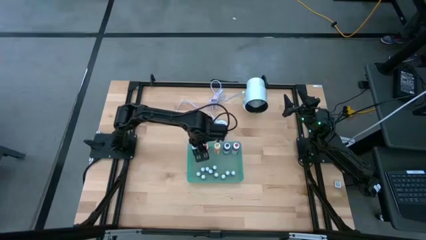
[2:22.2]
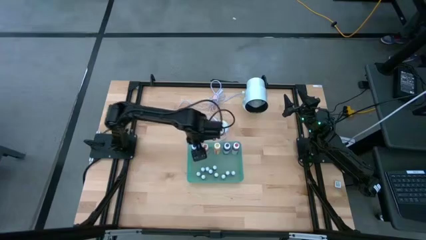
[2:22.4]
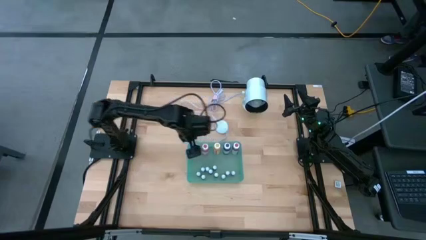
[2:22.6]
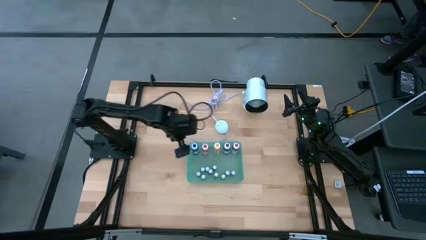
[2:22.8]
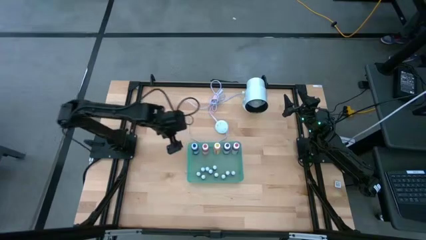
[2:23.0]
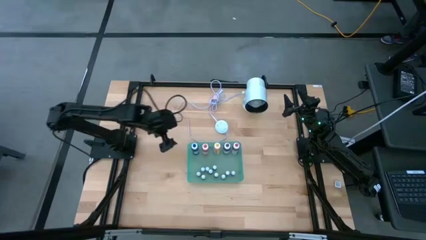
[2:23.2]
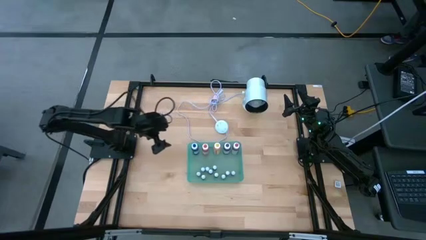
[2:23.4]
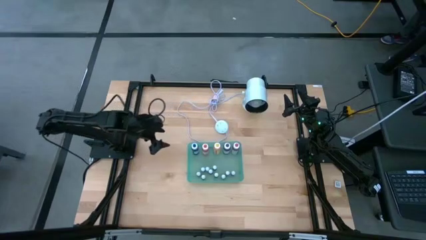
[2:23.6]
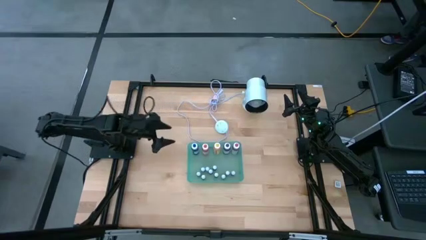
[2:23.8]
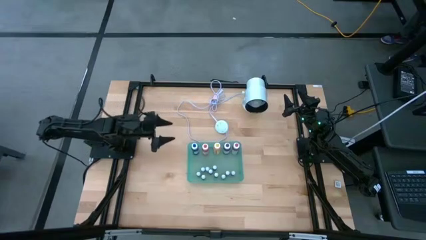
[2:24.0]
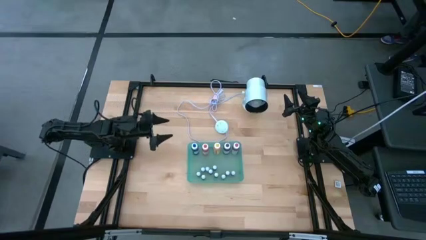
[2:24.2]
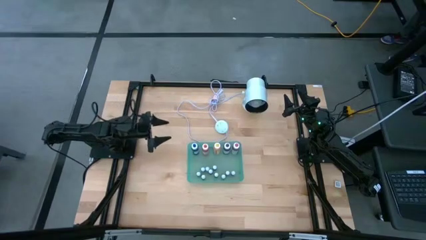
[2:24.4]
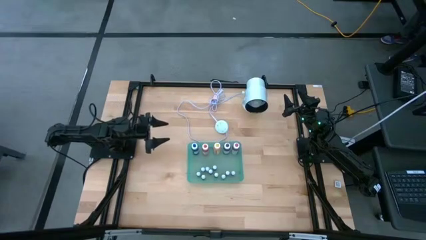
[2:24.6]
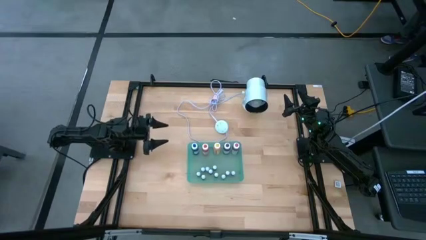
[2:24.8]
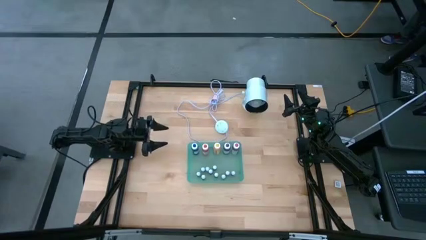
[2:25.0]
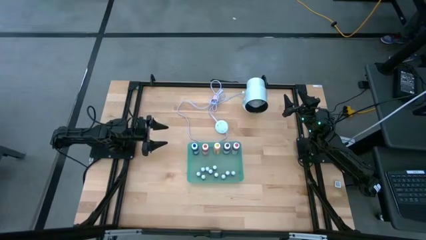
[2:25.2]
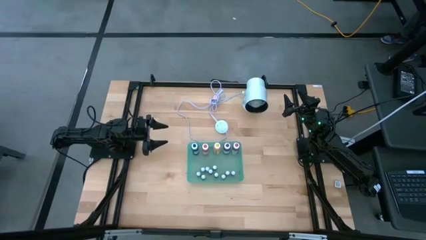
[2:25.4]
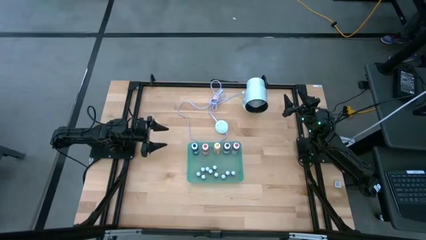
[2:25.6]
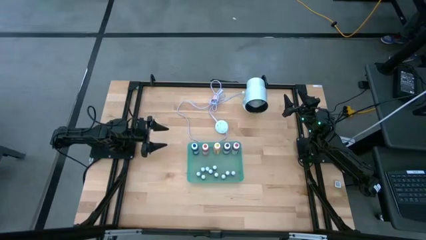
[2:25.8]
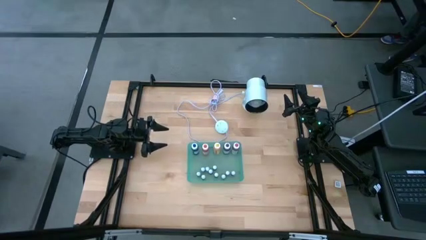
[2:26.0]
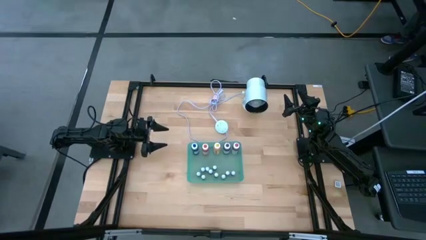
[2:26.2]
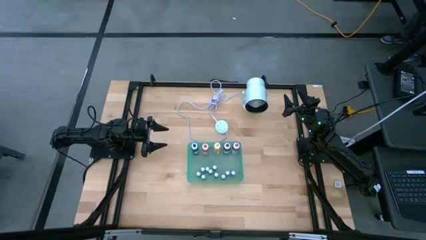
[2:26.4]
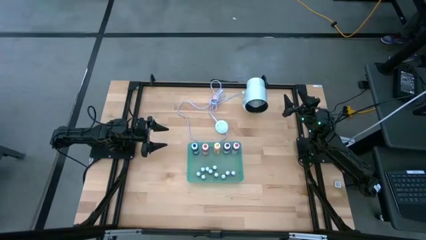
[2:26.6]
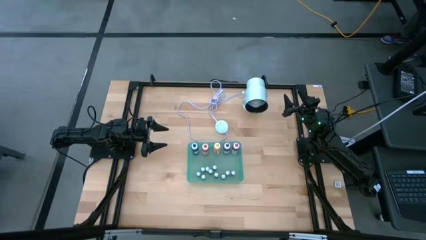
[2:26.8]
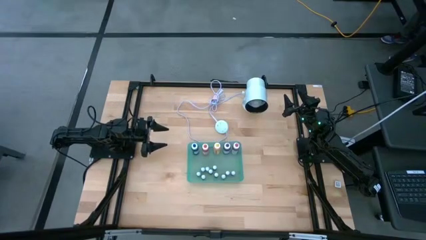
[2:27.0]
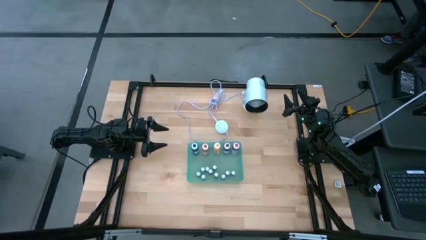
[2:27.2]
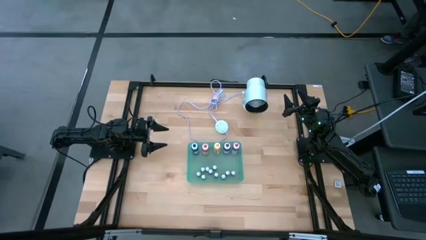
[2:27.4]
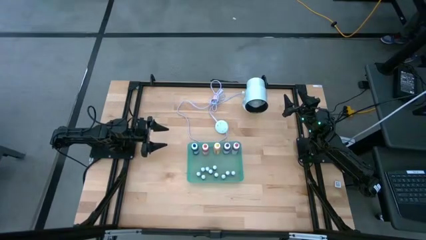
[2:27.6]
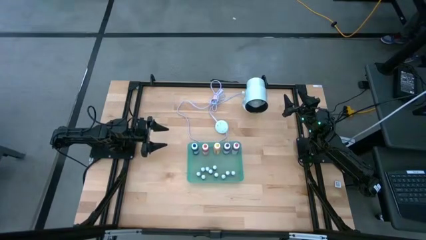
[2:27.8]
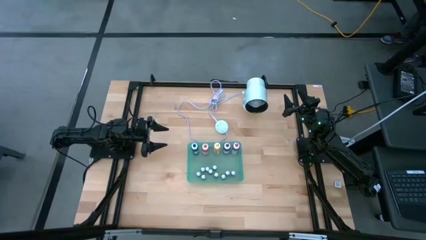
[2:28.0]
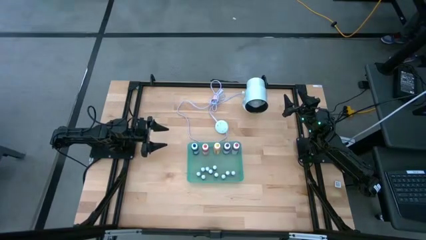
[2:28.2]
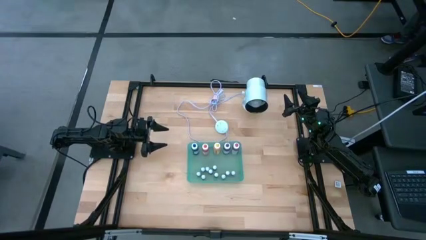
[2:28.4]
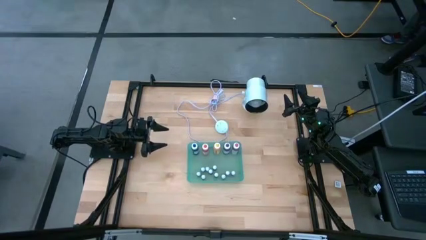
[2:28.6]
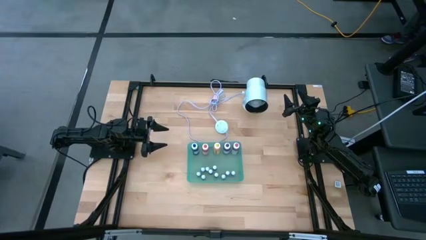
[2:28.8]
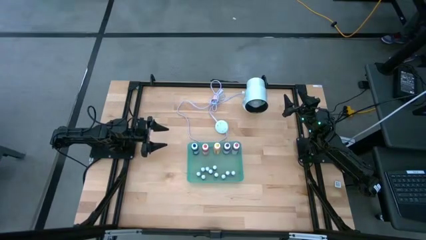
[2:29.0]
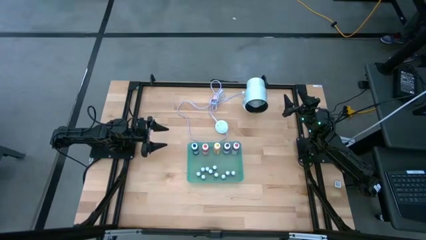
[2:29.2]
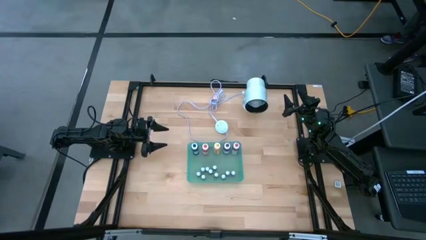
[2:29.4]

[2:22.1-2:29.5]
Task: Pick & Place food coloring
Return to Home Position

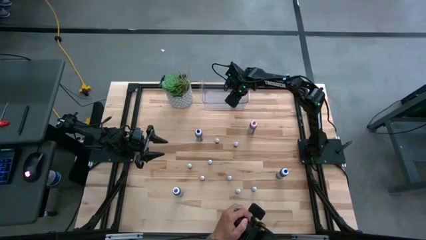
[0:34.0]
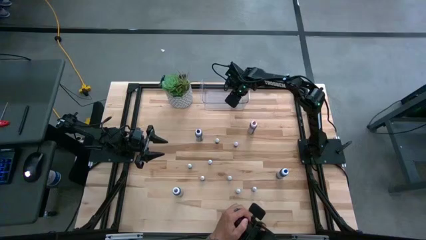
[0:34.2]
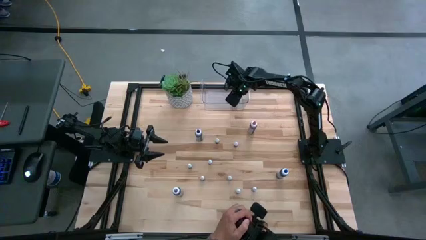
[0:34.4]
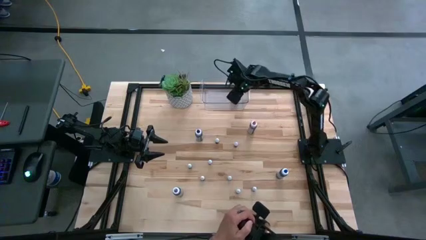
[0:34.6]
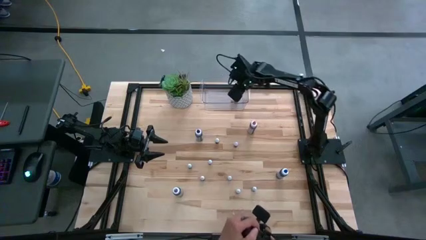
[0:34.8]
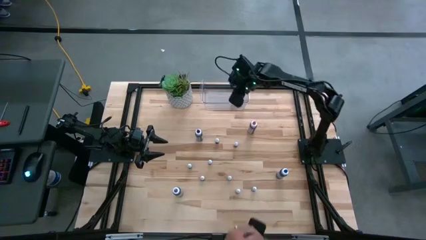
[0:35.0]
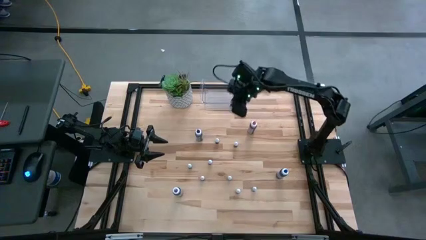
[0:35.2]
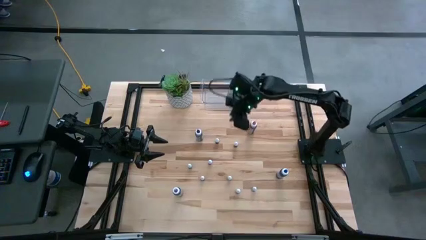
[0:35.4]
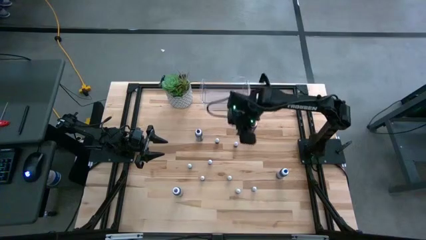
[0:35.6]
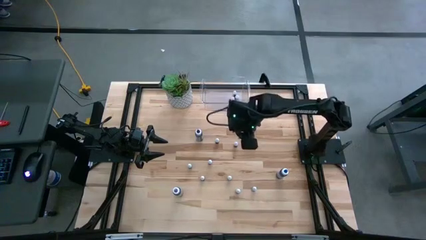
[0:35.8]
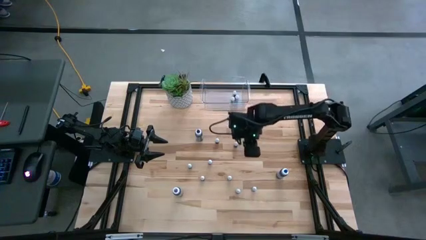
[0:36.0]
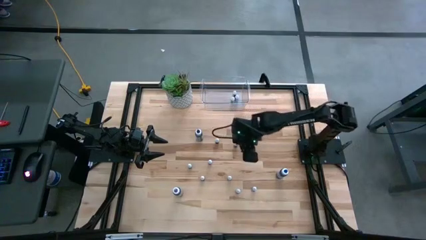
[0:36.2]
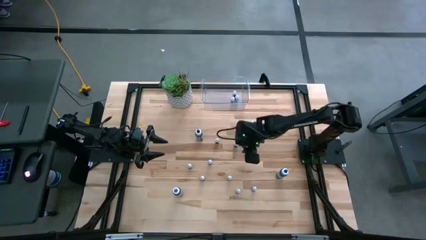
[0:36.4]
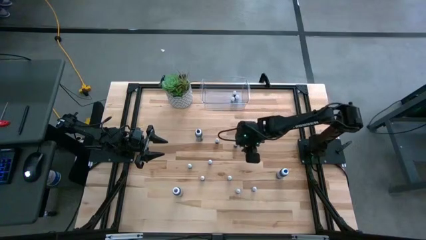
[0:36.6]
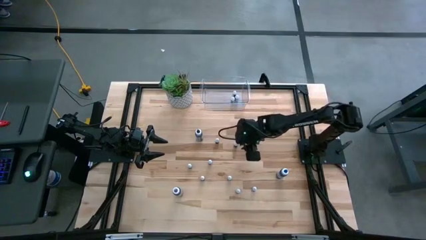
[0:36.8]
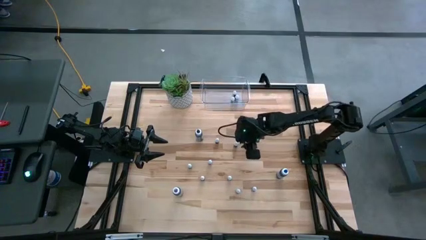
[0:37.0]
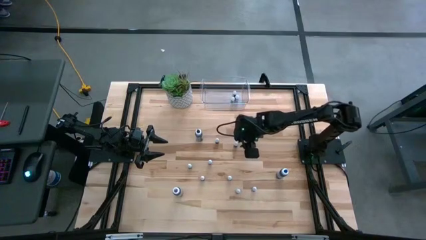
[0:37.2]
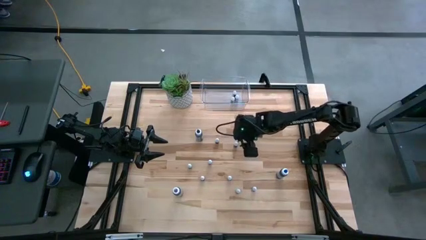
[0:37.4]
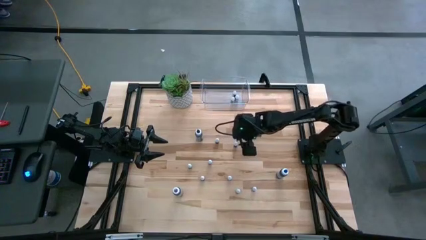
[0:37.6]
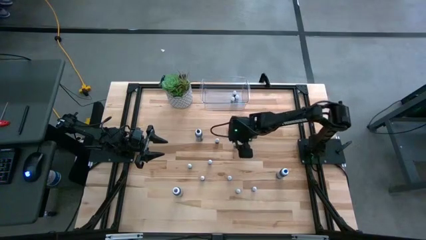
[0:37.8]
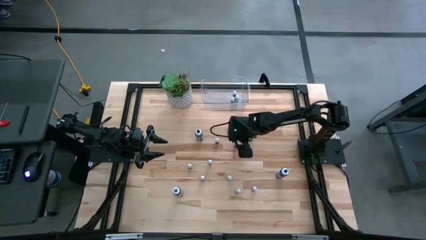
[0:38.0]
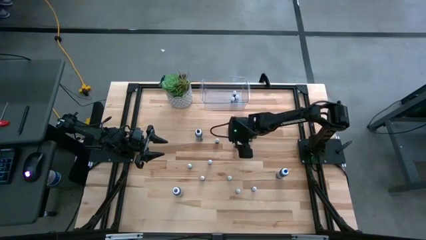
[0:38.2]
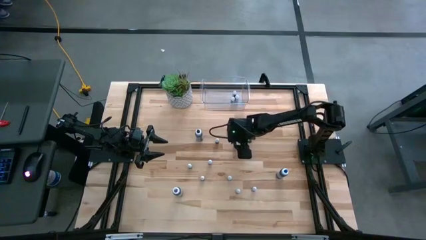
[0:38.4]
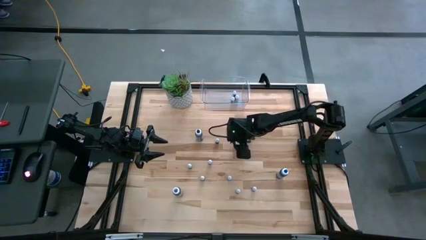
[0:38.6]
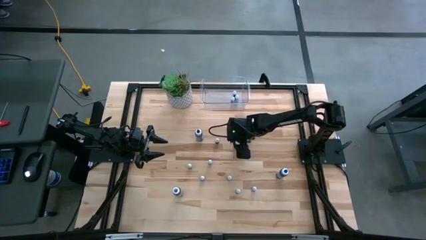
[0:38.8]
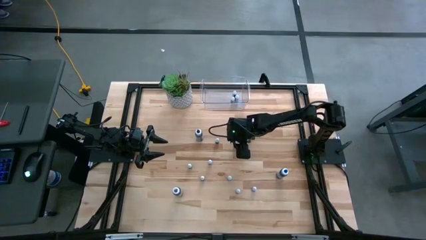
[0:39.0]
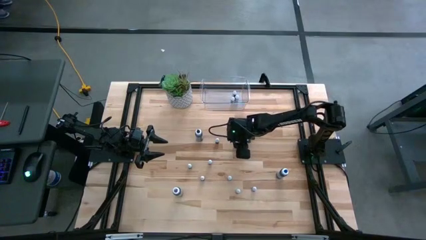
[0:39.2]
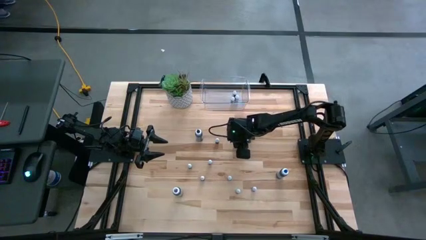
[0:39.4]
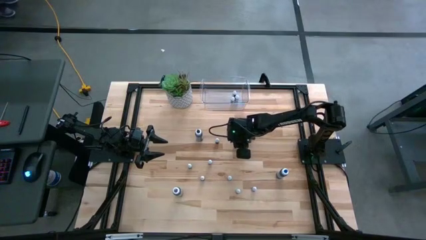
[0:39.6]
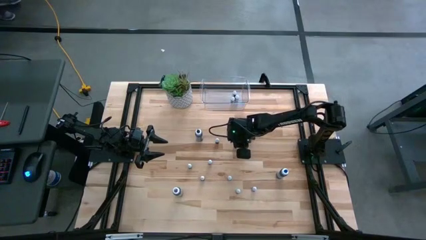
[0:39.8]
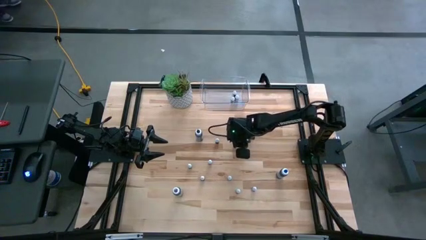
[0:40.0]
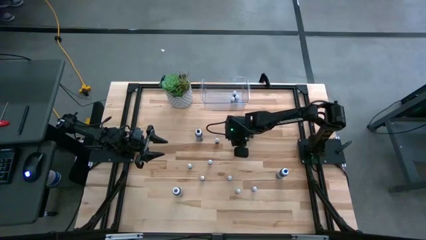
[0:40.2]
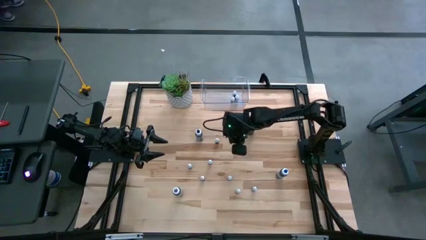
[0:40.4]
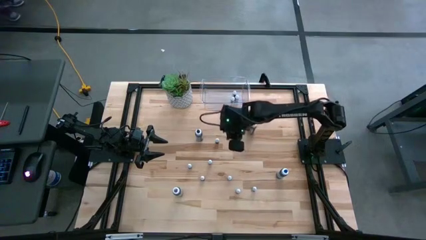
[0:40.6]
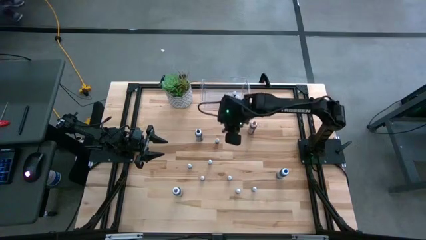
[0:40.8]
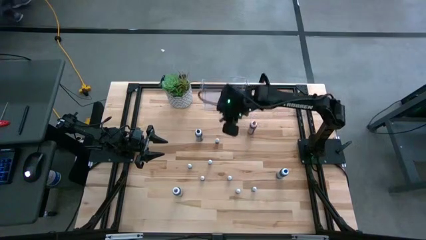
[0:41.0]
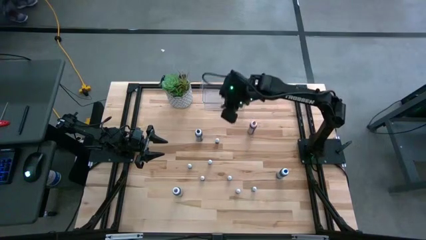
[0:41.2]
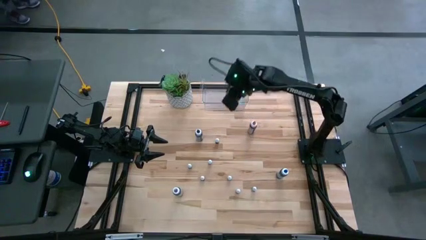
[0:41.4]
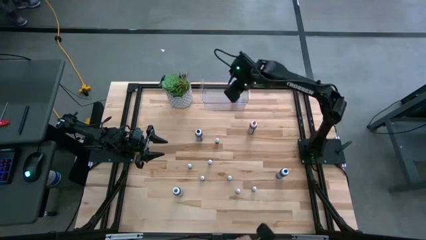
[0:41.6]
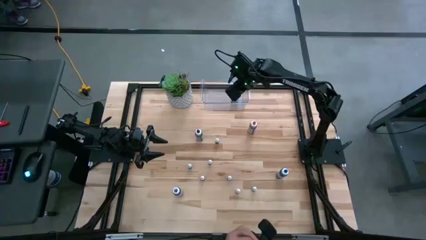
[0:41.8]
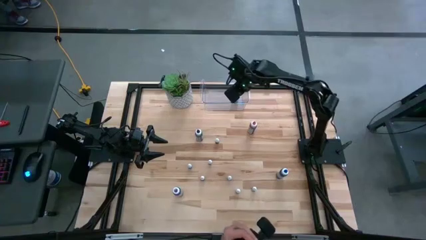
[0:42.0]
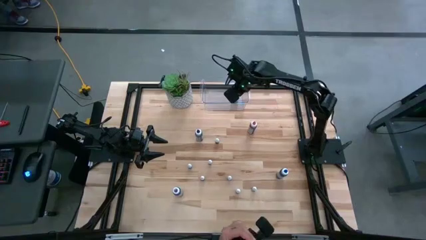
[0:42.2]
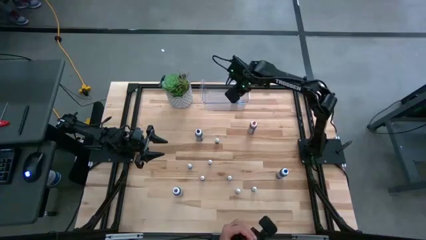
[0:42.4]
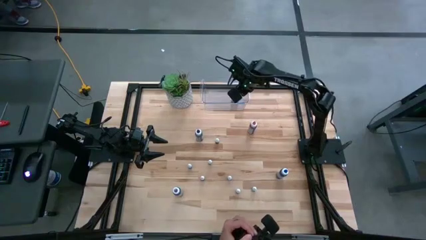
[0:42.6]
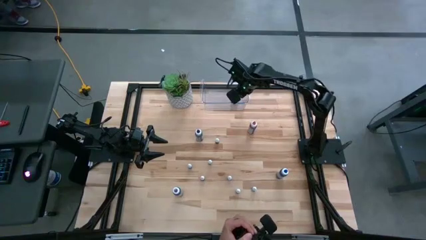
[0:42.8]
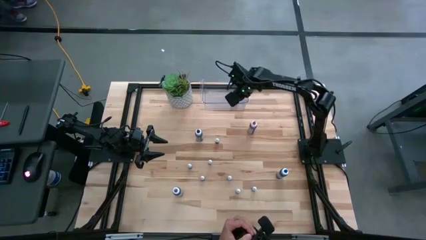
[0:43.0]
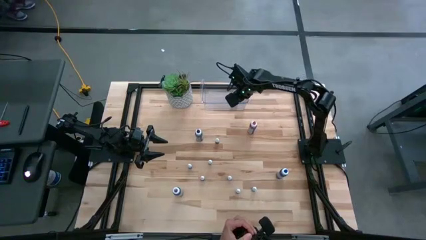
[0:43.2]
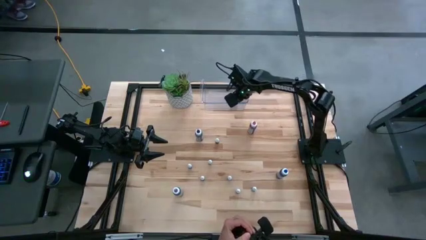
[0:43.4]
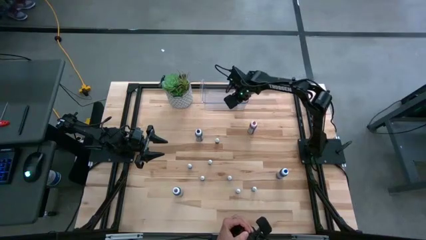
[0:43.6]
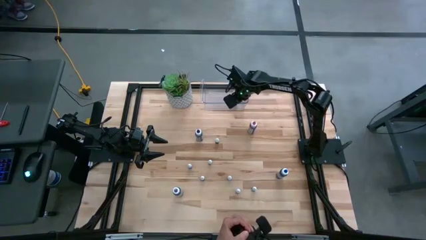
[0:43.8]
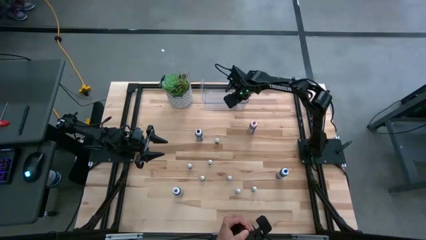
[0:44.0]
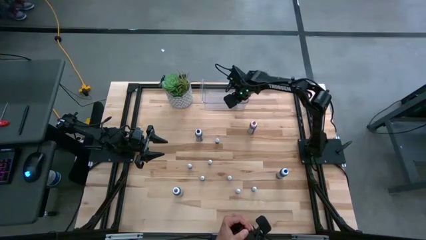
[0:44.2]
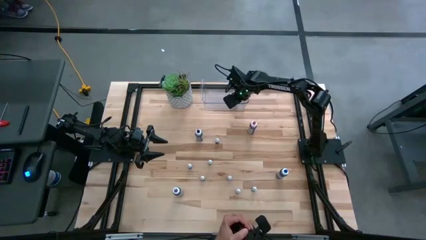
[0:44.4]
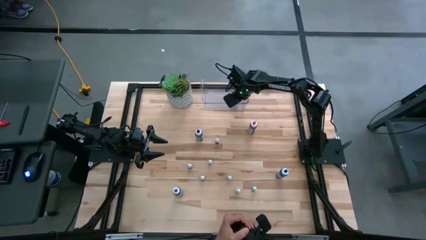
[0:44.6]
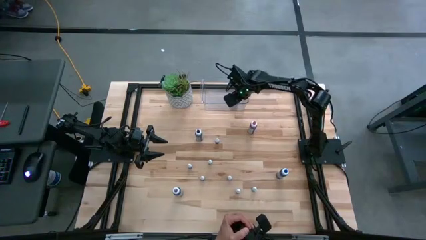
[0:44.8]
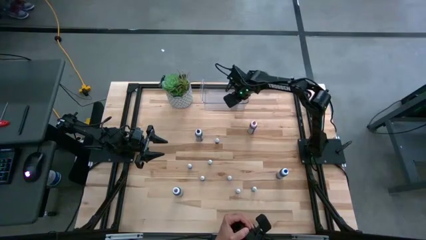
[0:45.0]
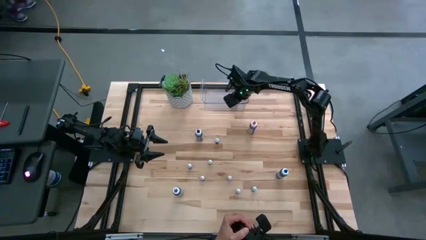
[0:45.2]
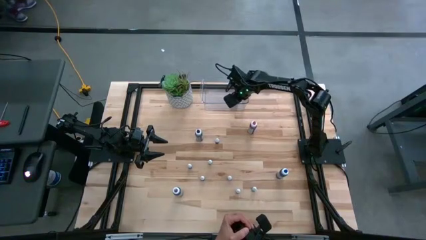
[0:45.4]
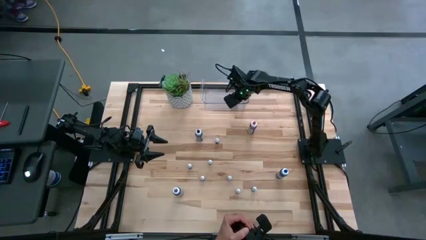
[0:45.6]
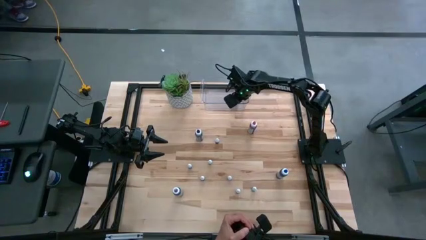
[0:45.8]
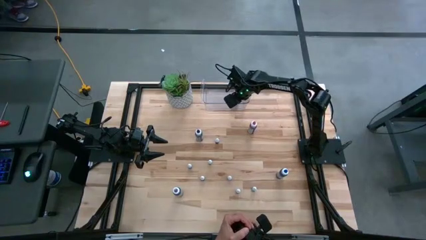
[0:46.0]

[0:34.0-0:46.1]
Task: Pick & Place food coloring
Put the top small red food coloring bottle into the bin
